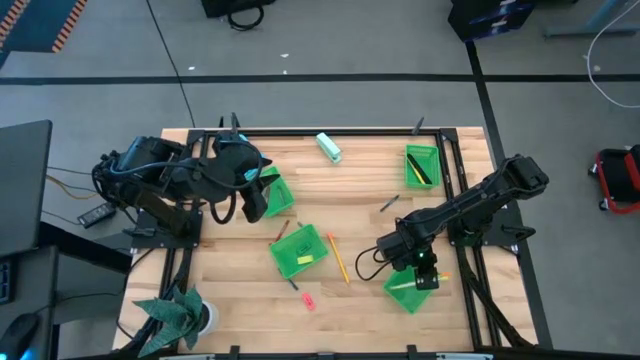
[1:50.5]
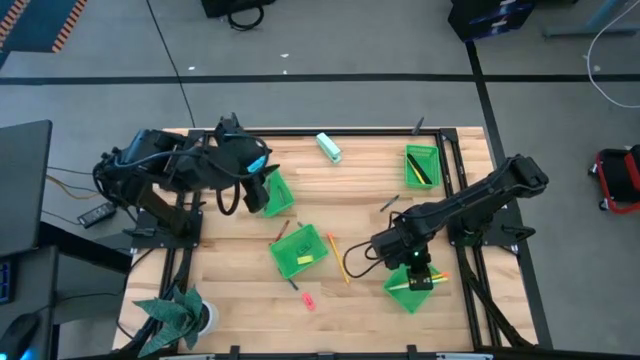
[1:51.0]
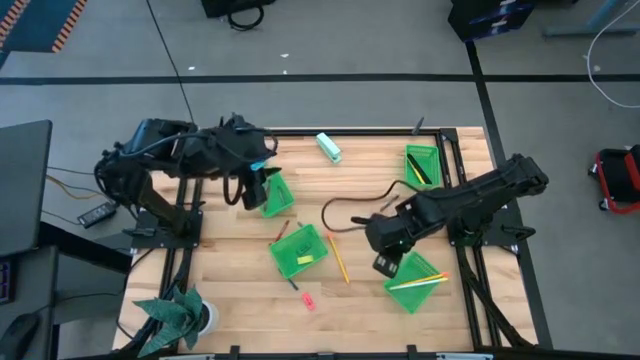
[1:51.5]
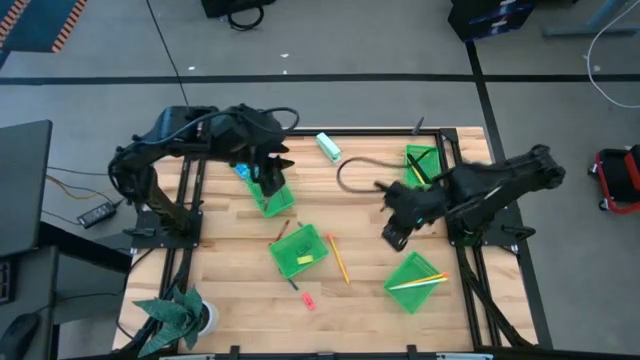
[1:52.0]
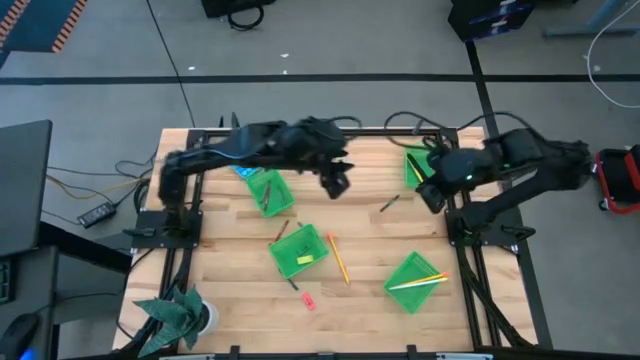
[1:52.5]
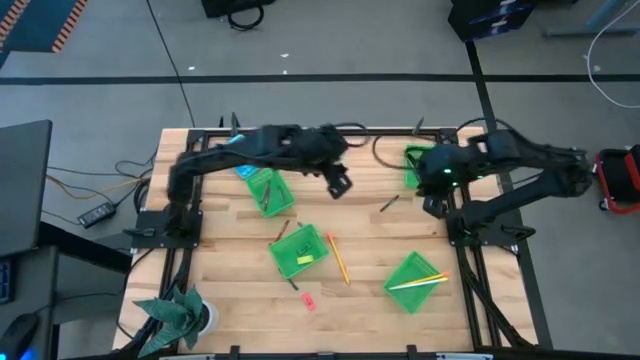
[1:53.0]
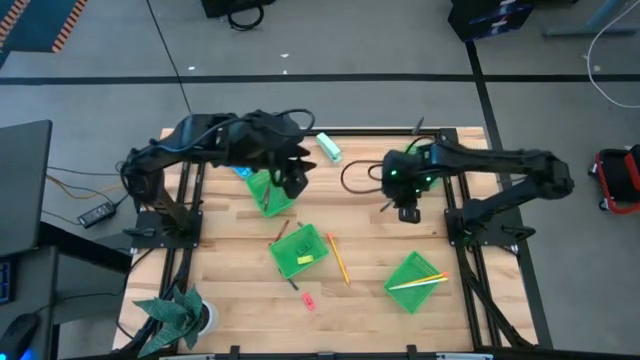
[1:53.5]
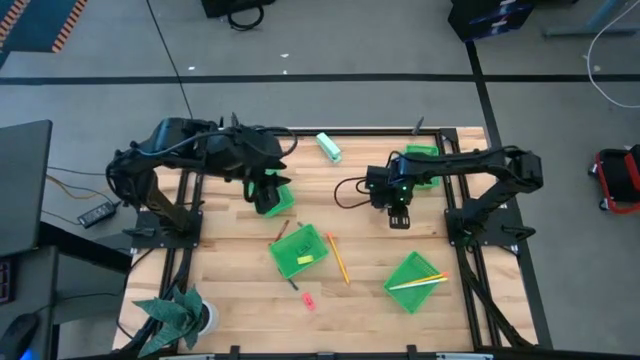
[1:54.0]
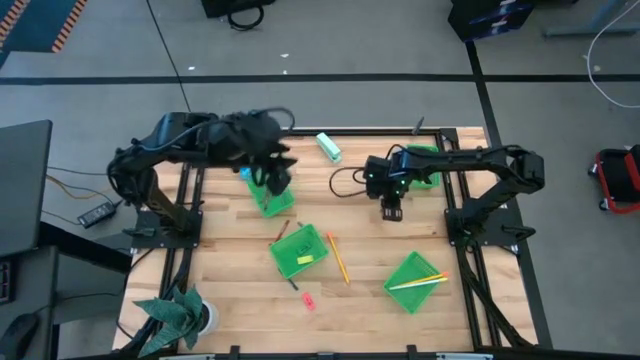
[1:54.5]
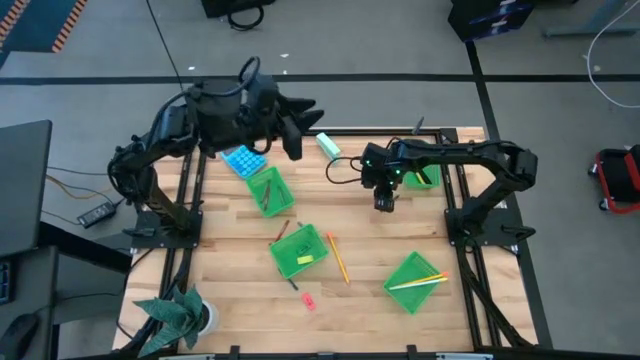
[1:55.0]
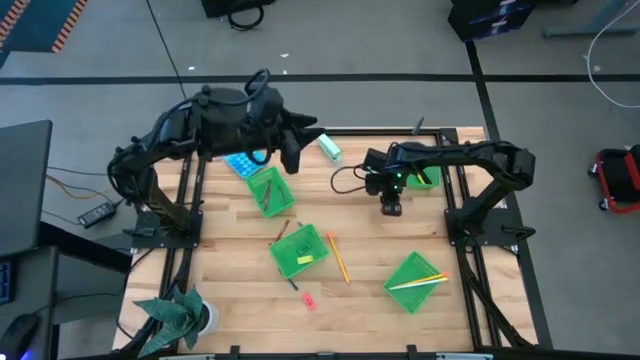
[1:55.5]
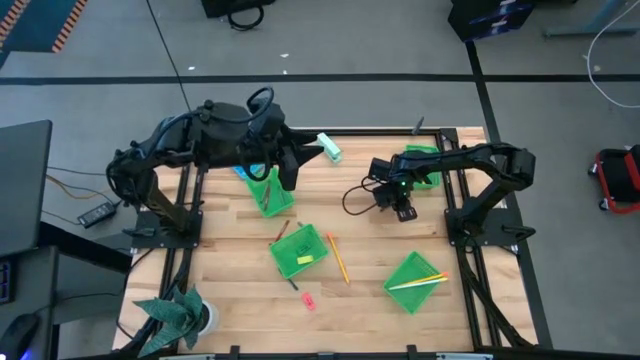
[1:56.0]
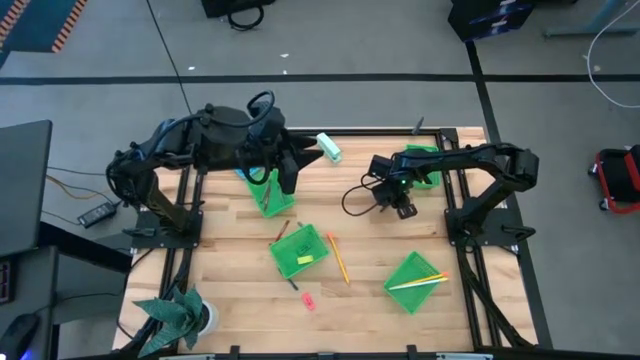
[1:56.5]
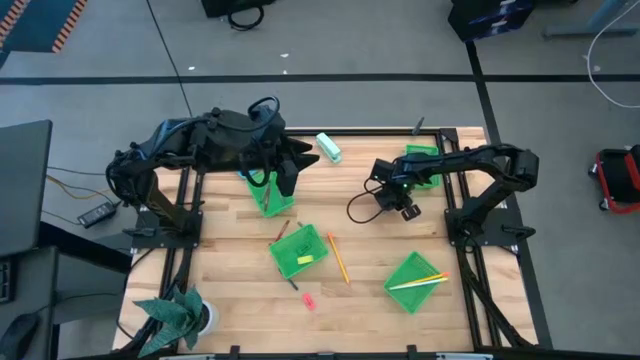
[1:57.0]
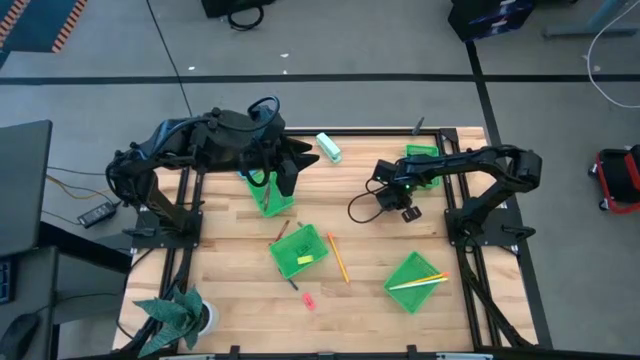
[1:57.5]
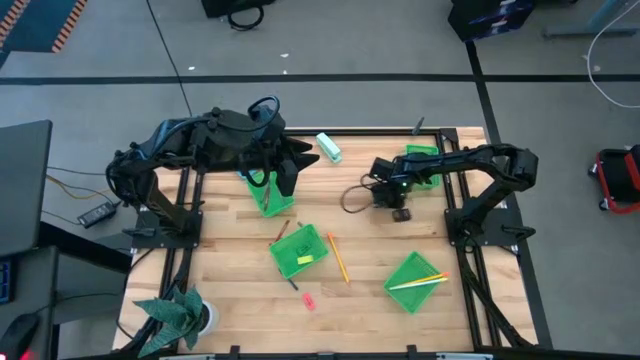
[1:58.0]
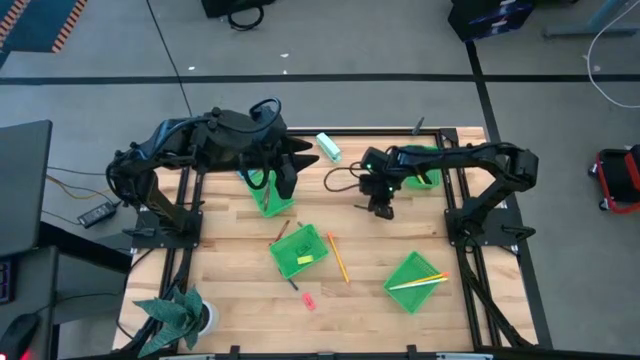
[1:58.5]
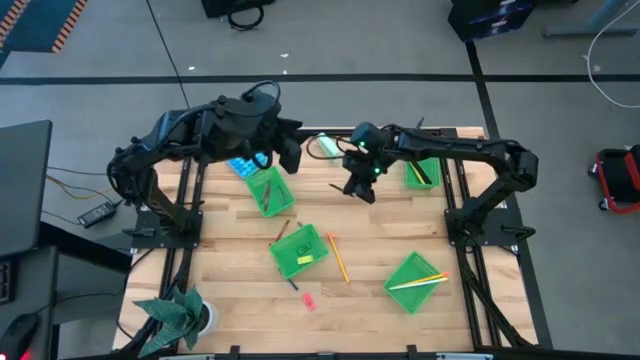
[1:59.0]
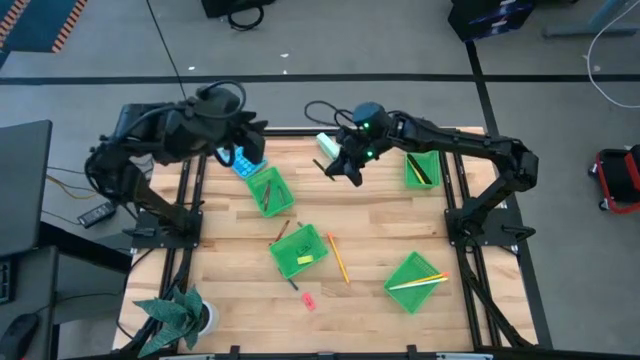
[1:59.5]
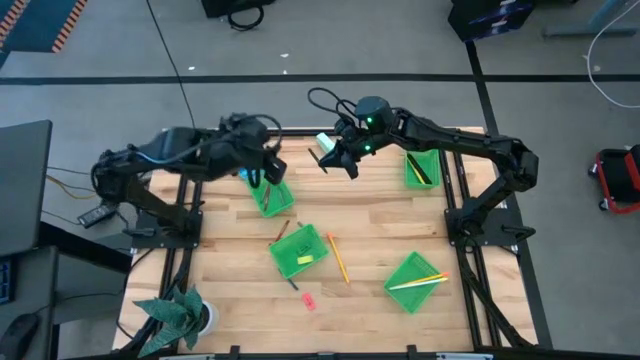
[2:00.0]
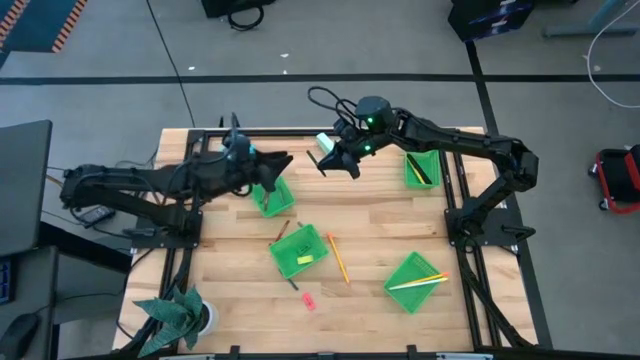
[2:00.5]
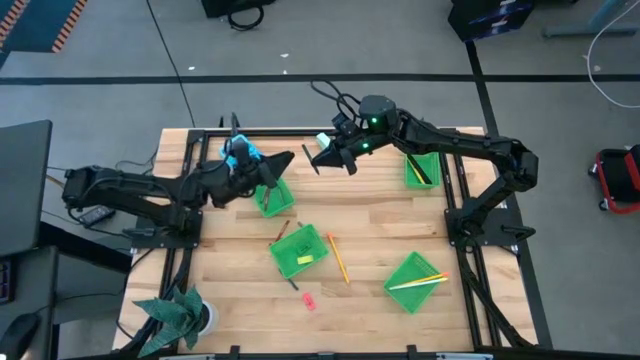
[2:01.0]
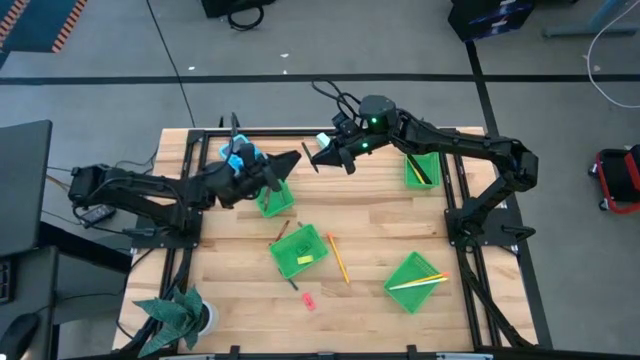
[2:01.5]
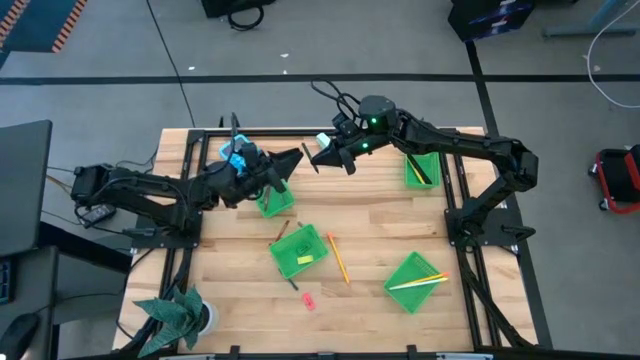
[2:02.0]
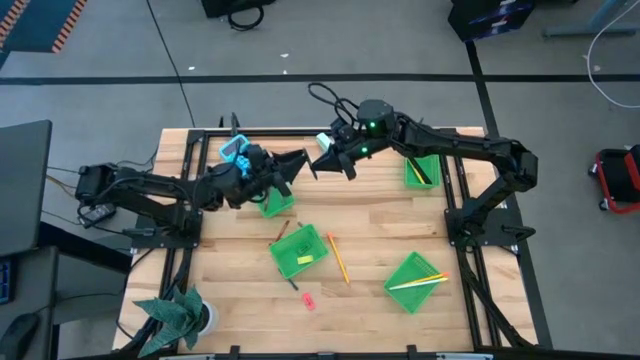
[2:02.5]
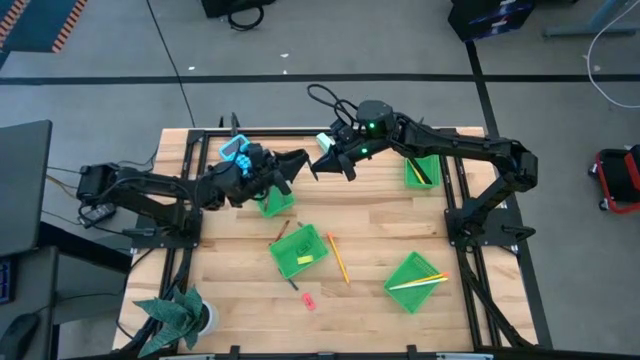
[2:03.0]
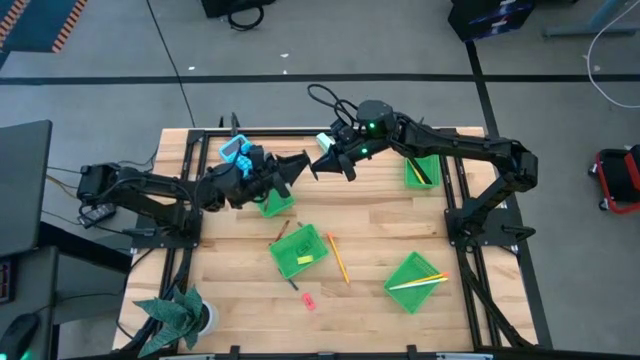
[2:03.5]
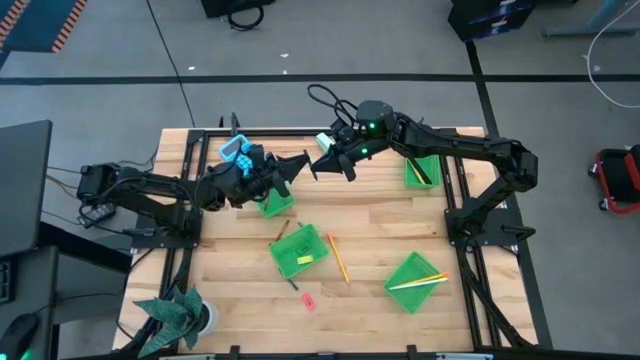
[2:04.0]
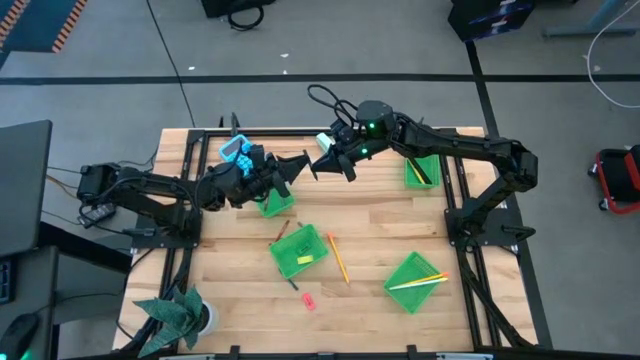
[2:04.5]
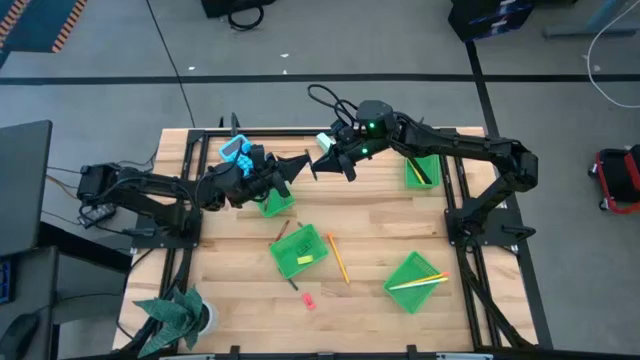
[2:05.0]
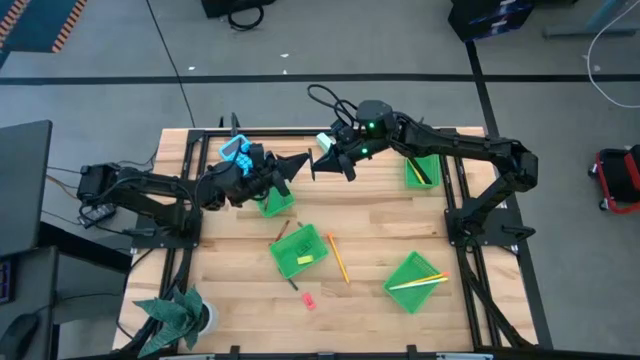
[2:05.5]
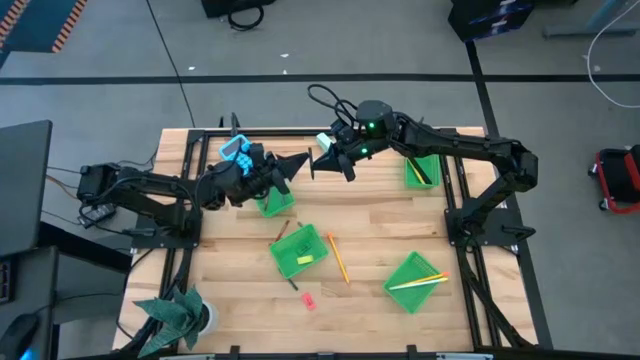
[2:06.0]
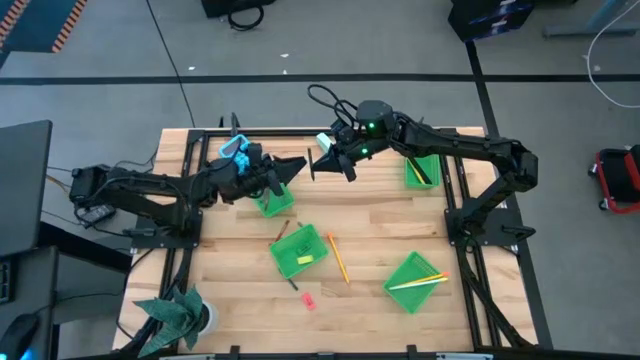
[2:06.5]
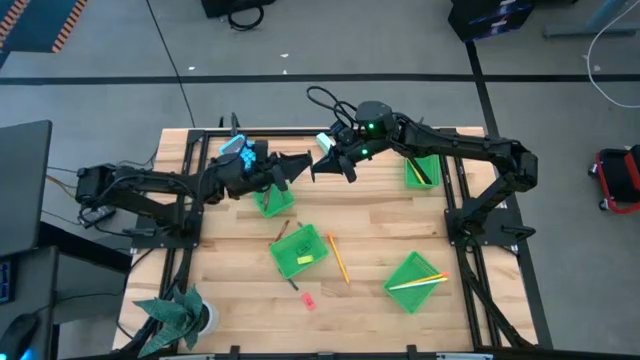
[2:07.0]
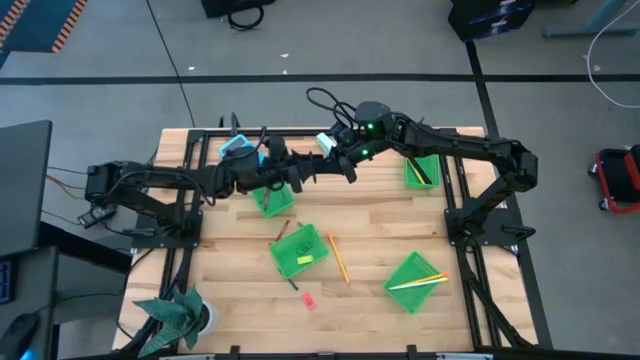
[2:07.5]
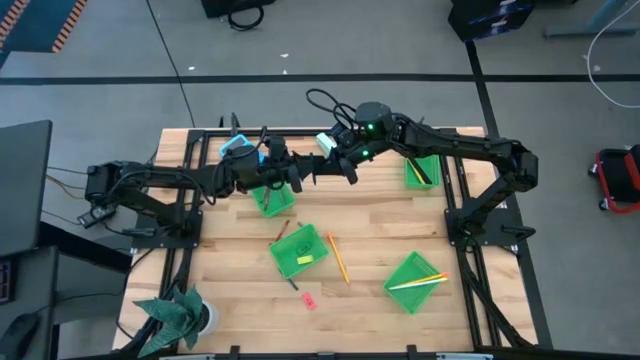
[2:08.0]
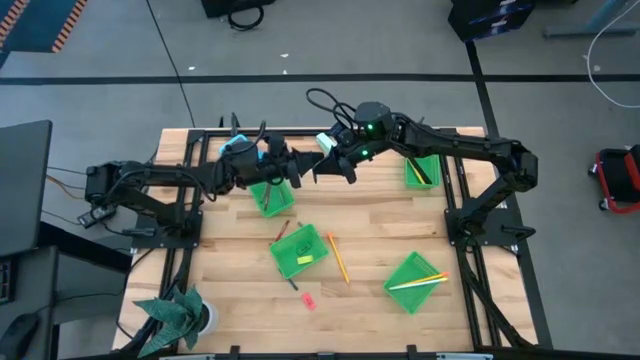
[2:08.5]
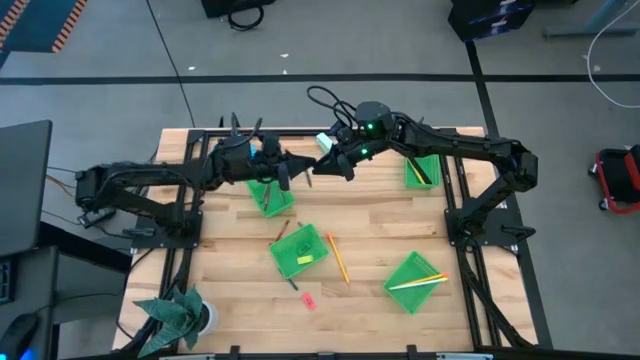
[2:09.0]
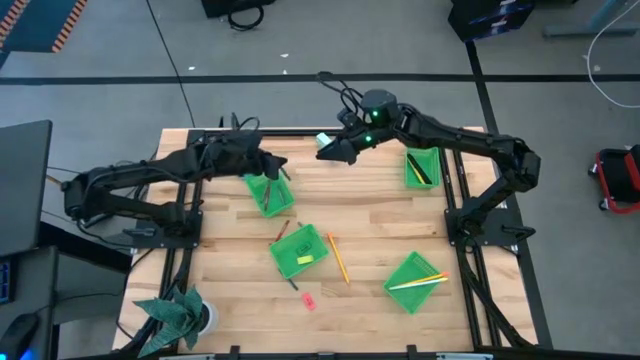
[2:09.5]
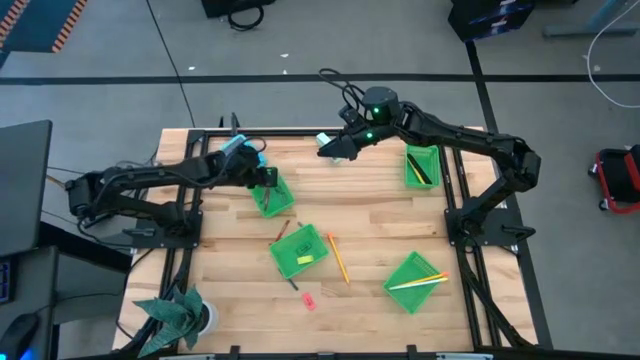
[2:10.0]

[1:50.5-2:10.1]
Task: Sort crayons/erasers/pens/pencils in bins
Put the top green crayon into the top left green bin

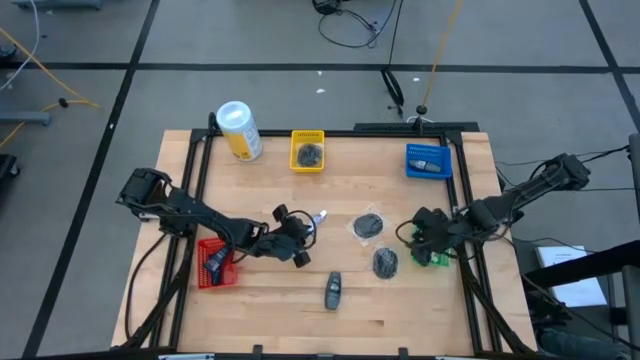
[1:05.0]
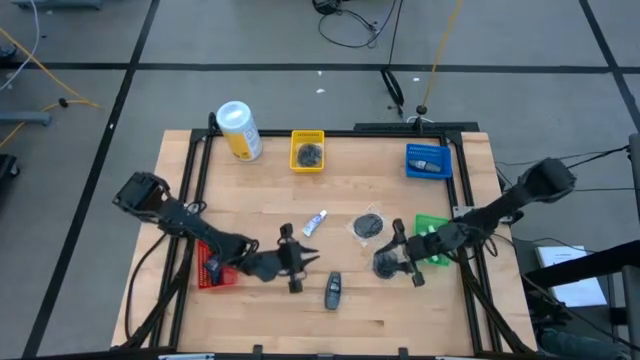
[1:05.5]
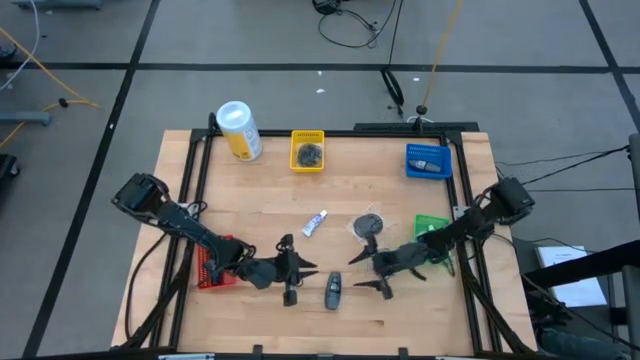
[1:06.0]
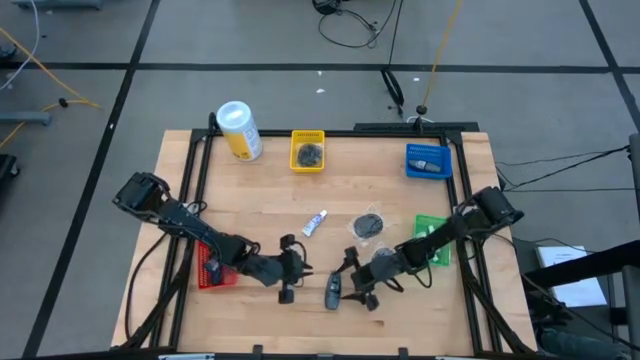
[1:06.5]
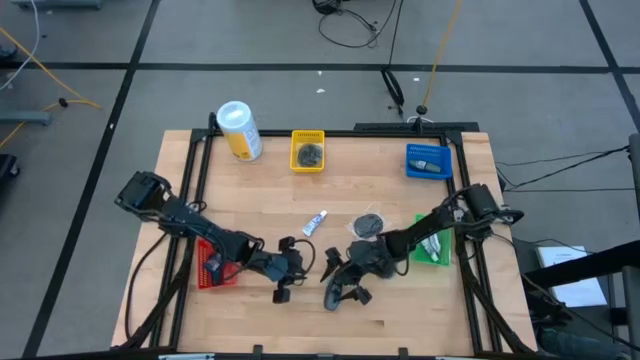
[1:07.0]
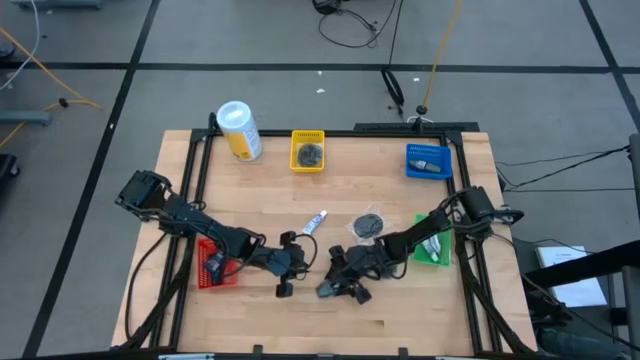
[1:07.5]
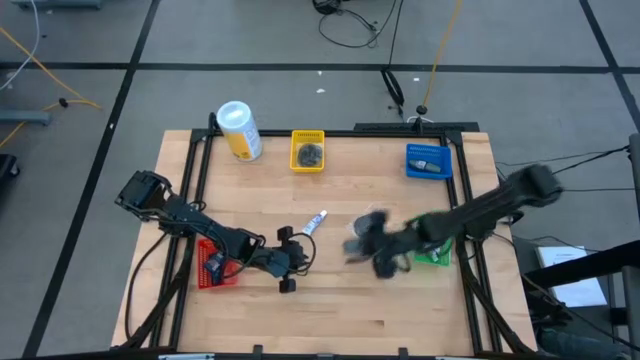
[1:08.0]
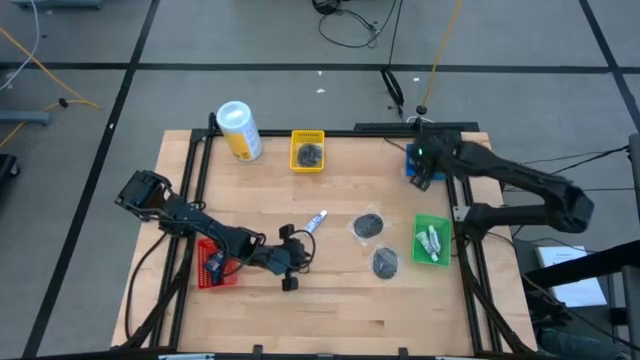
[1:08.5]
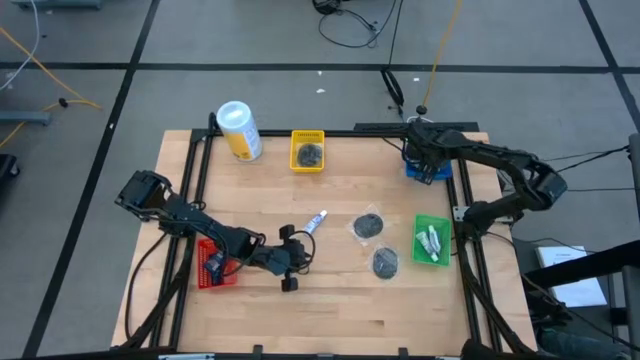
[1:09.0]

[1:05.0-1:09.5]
Task: Pick & Place Travel size toiletries
Put the deodorant into the blue bin
